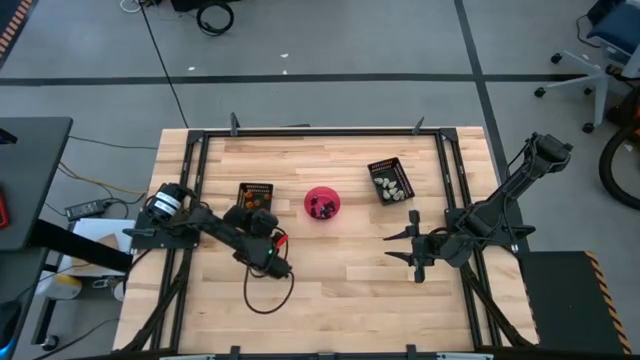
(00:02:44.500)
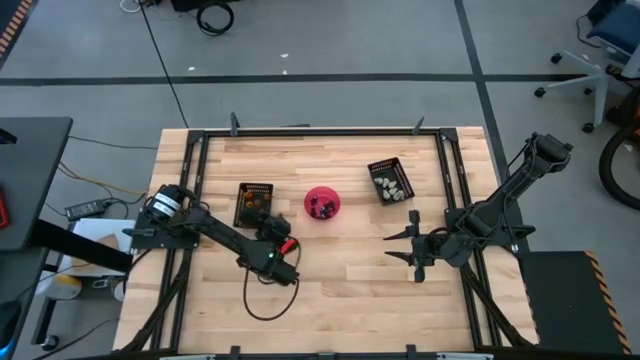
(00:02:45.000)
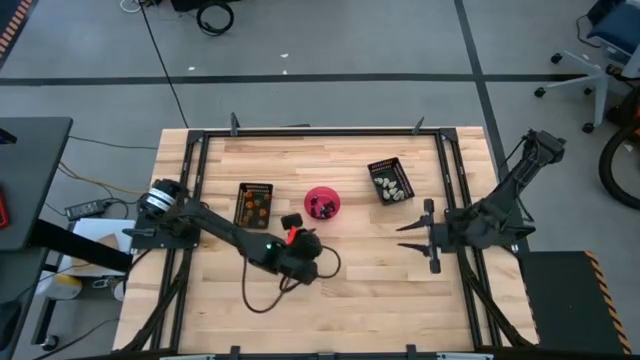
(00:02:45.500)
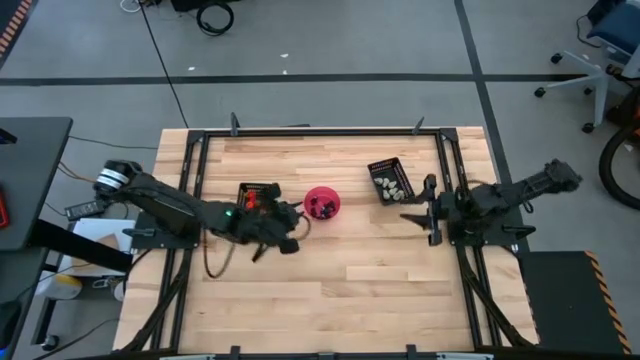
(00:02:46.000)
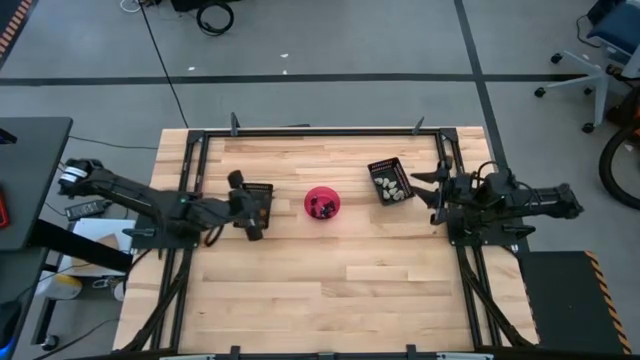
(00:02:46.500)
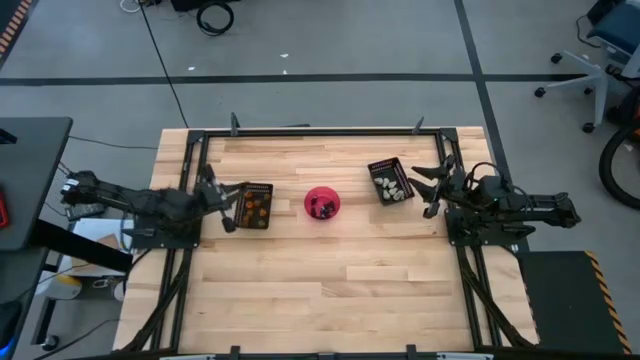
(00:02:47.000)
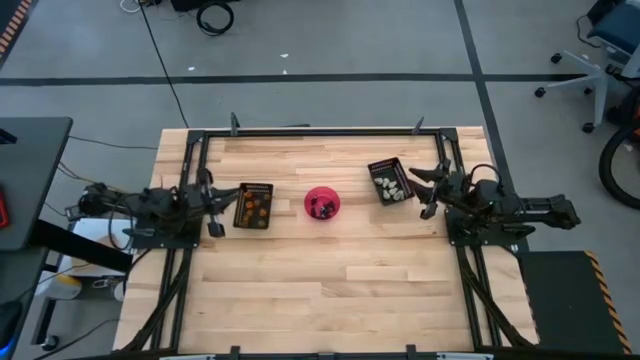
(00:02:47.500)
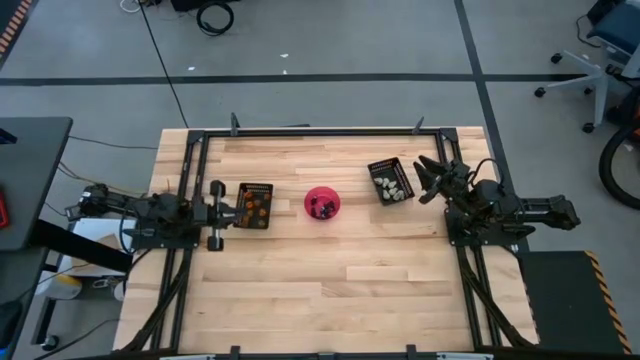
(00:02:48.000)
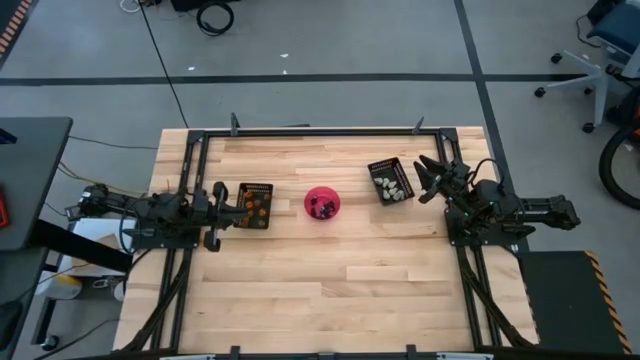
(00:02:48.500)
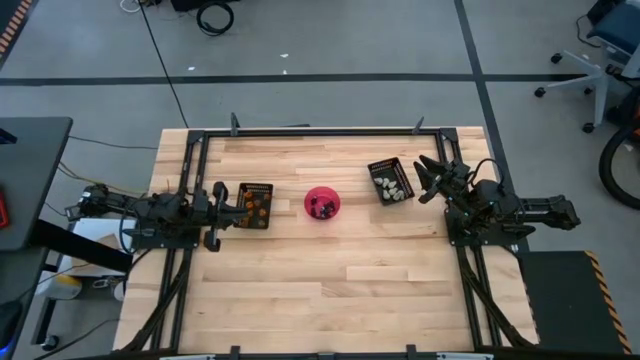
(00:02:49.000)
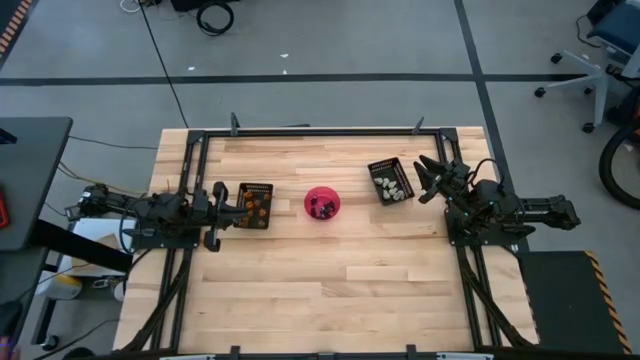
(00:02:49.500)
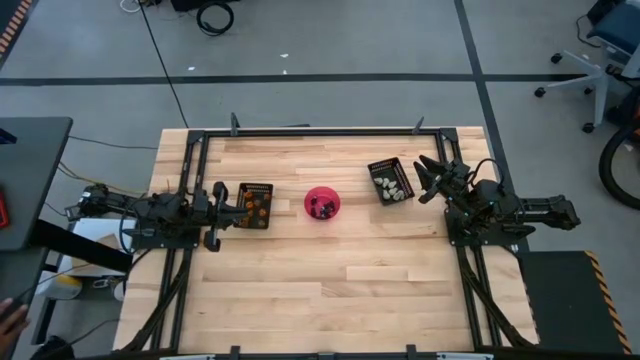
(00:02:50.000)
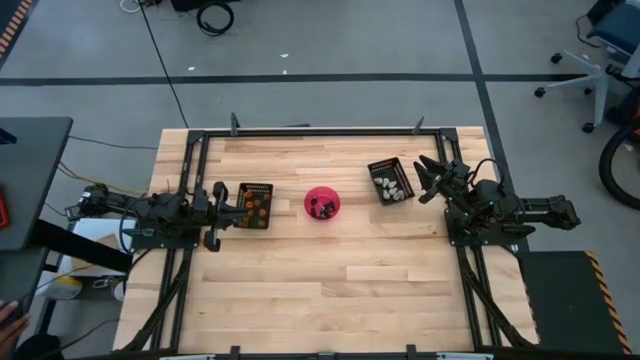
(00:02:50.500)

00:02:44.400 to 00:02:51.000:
Task: Sort Halloween decoration
Return to Home Position

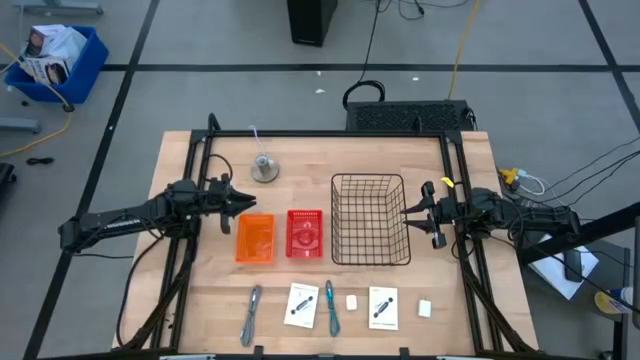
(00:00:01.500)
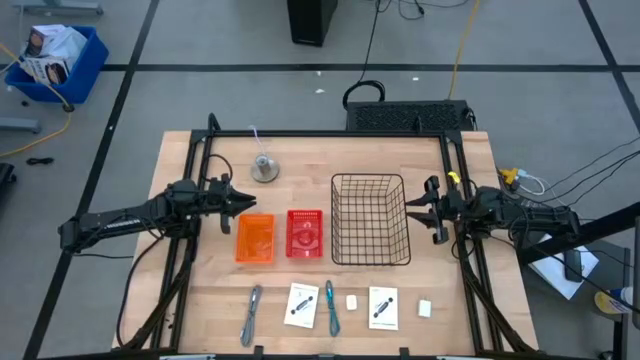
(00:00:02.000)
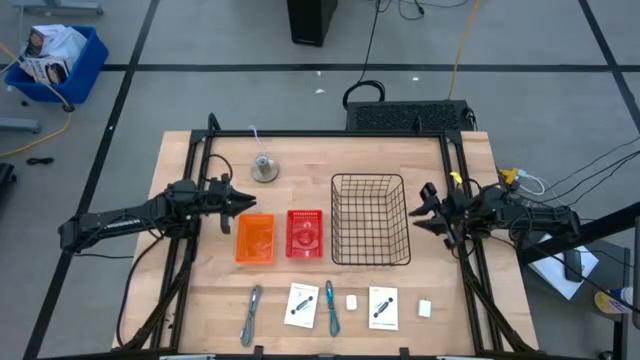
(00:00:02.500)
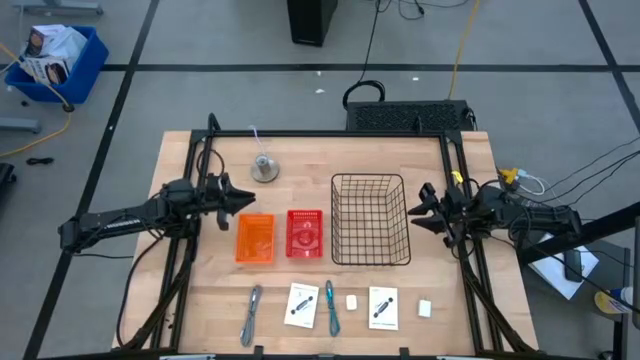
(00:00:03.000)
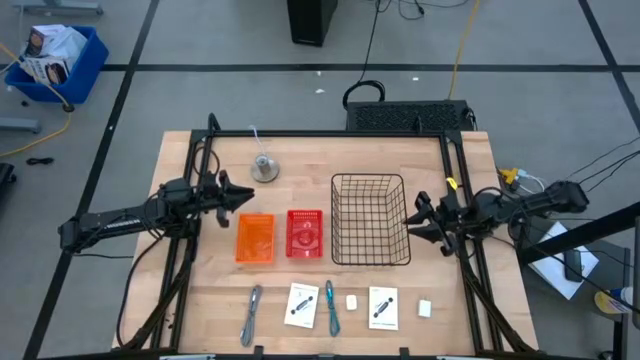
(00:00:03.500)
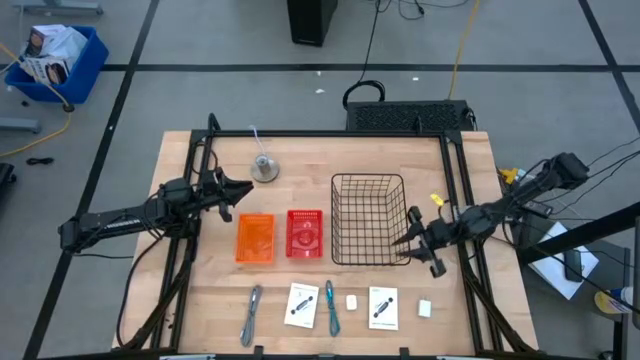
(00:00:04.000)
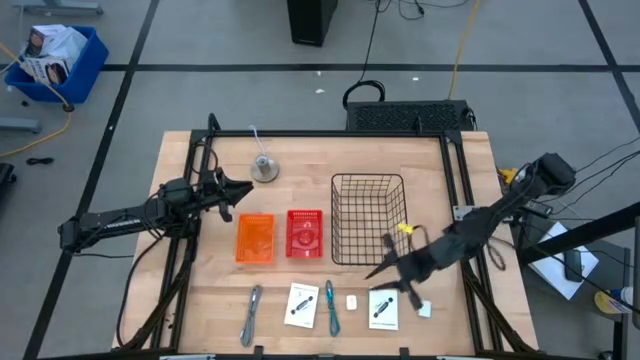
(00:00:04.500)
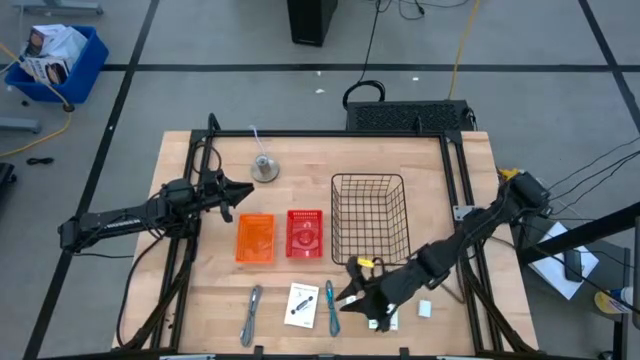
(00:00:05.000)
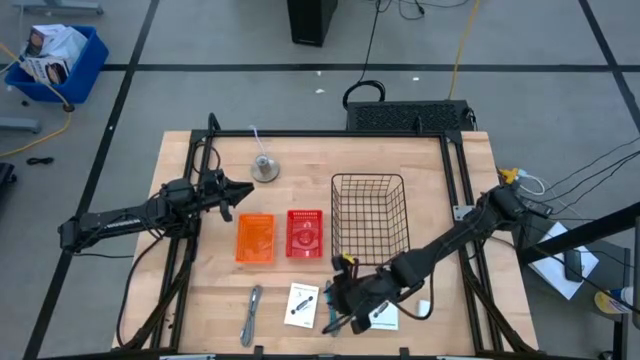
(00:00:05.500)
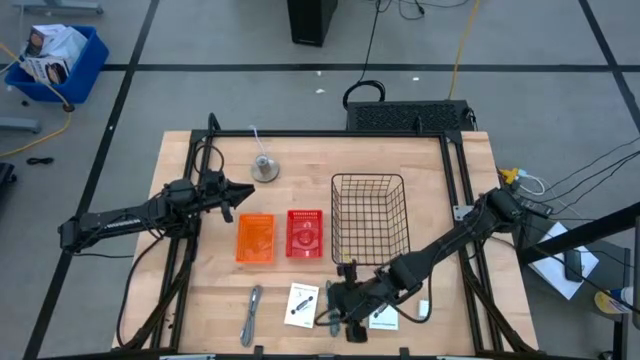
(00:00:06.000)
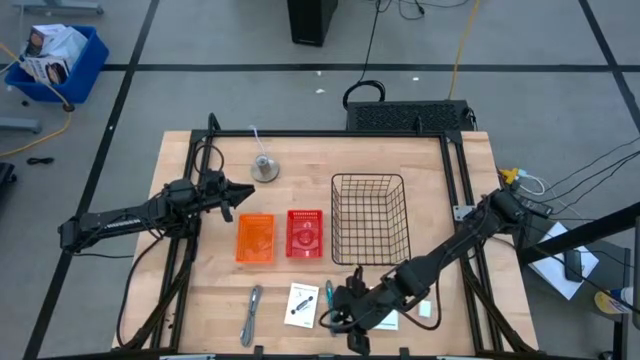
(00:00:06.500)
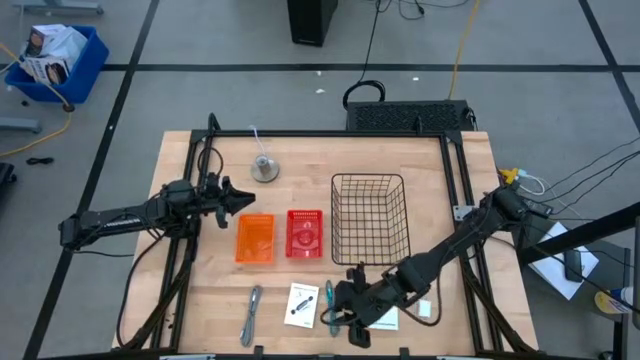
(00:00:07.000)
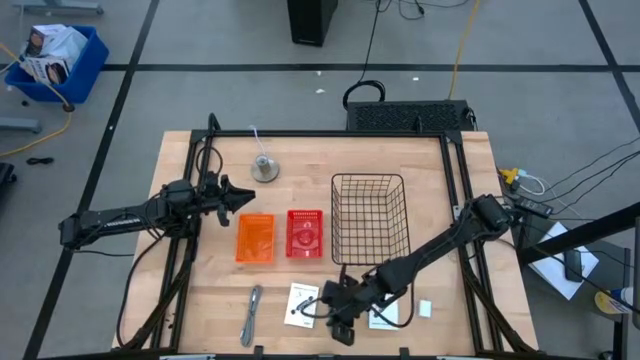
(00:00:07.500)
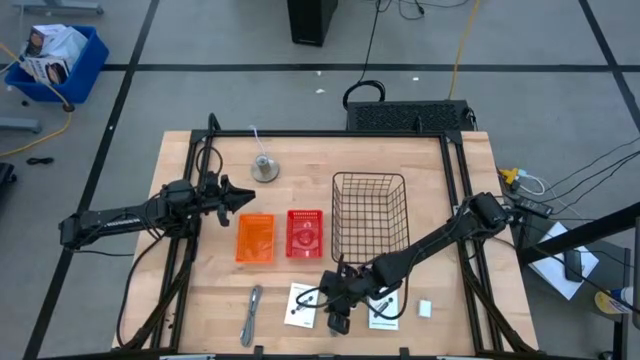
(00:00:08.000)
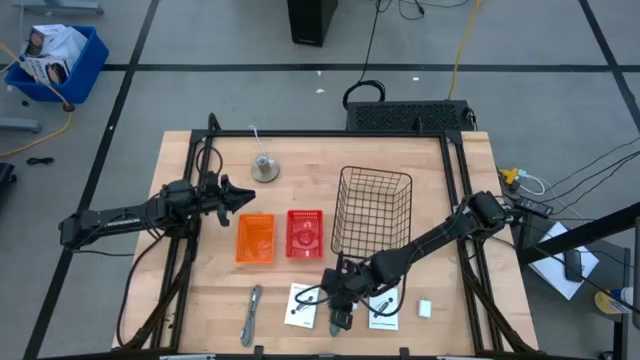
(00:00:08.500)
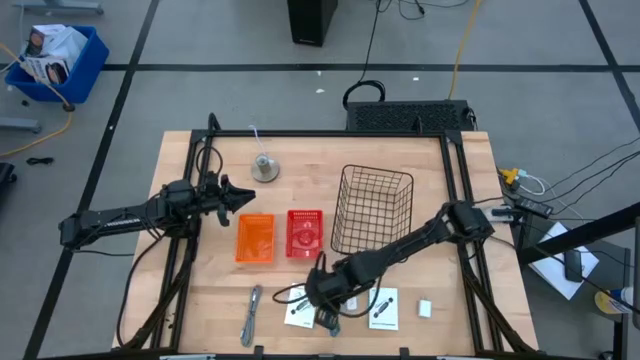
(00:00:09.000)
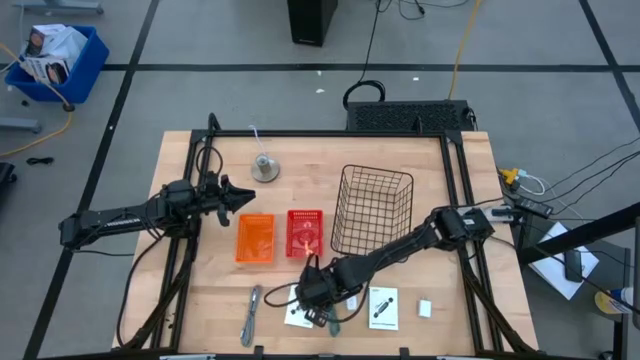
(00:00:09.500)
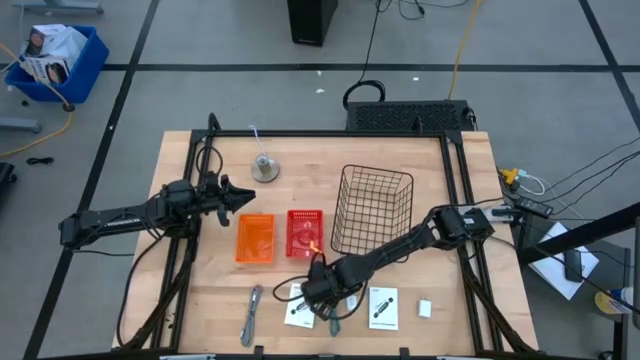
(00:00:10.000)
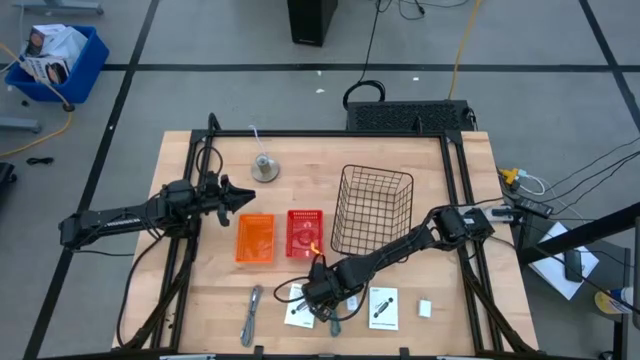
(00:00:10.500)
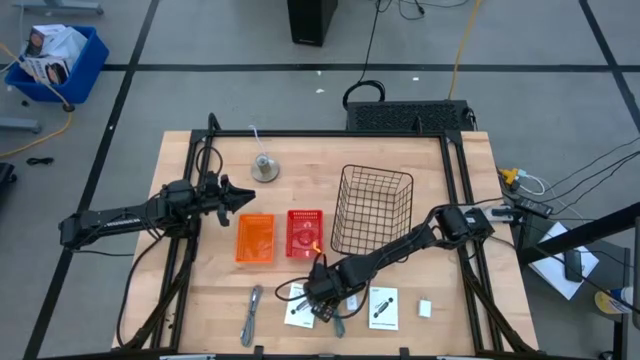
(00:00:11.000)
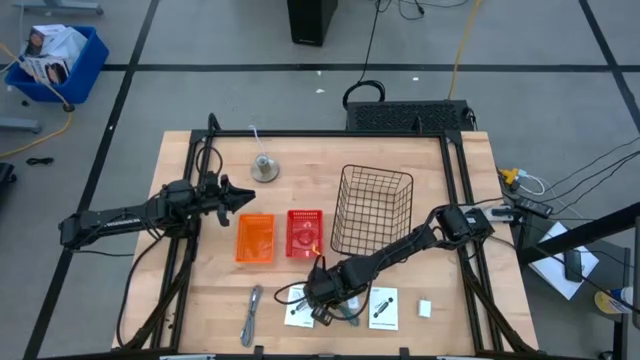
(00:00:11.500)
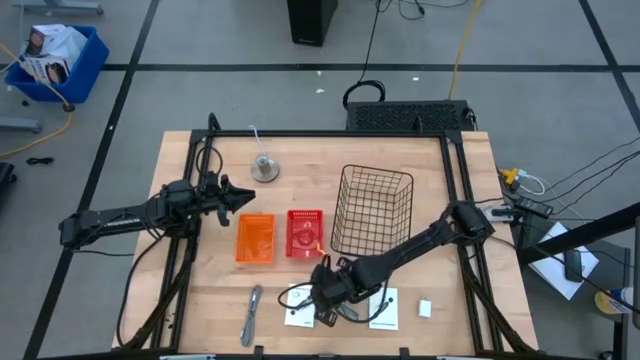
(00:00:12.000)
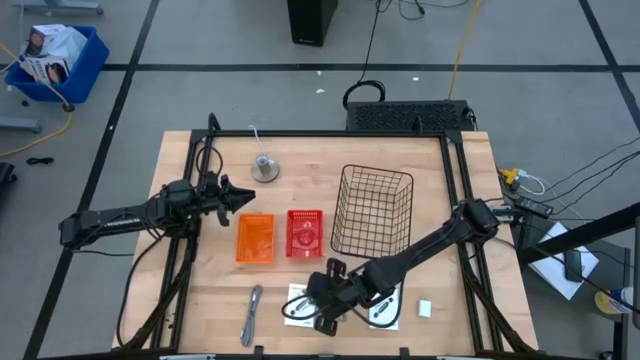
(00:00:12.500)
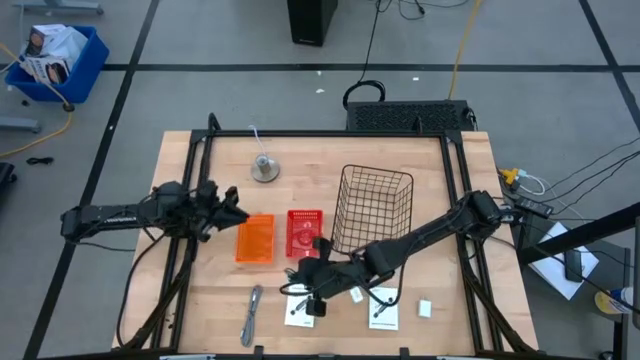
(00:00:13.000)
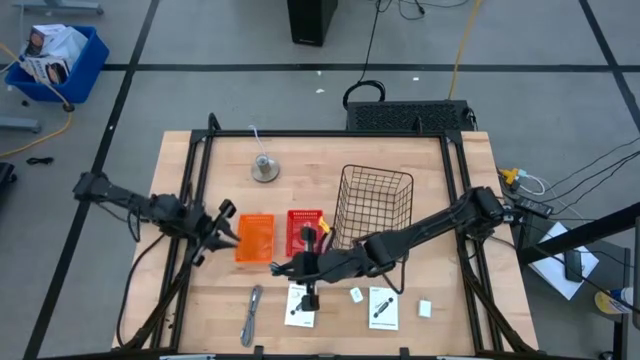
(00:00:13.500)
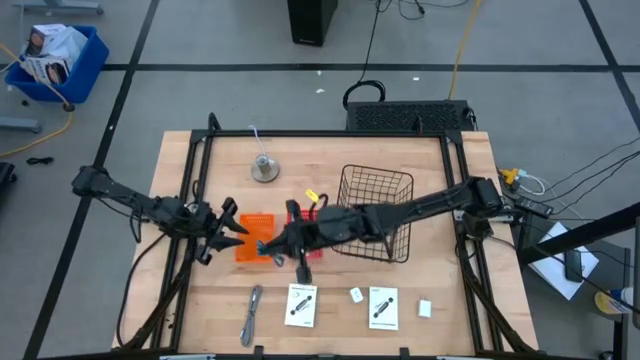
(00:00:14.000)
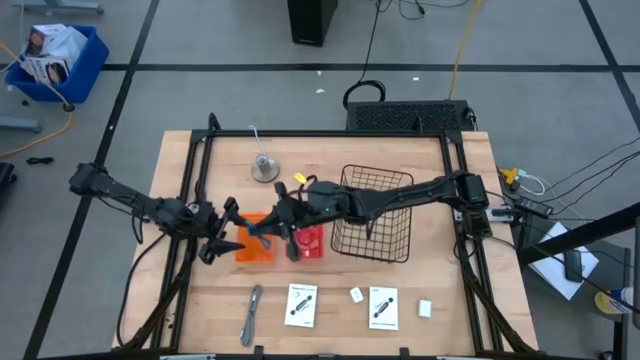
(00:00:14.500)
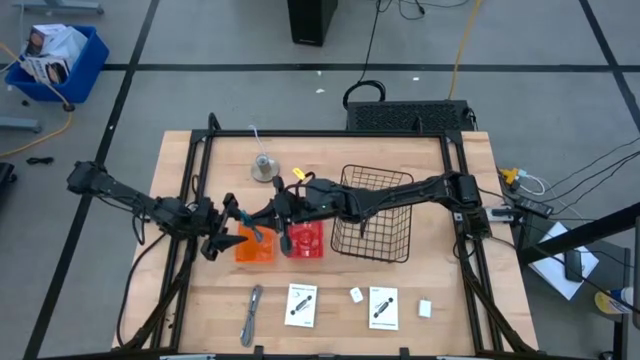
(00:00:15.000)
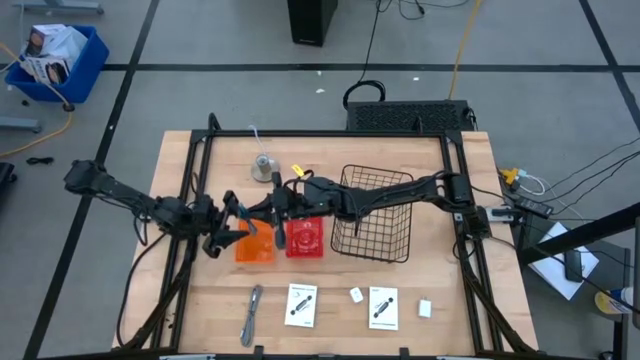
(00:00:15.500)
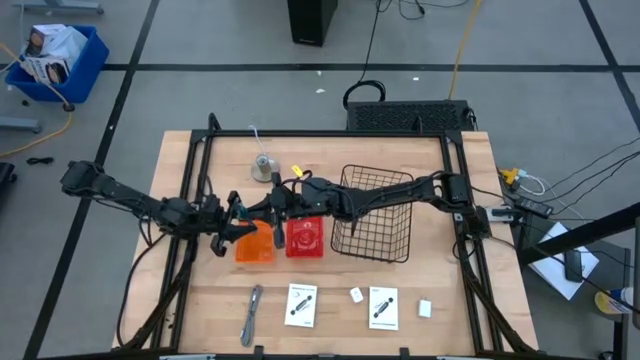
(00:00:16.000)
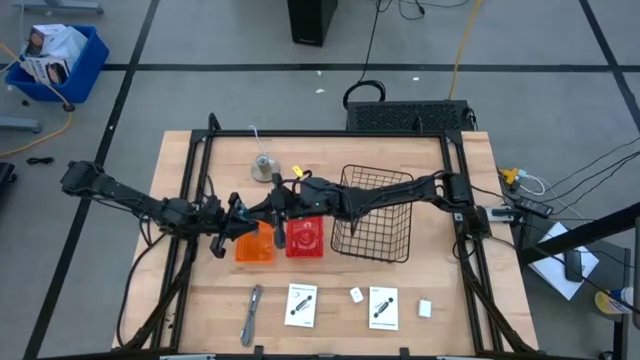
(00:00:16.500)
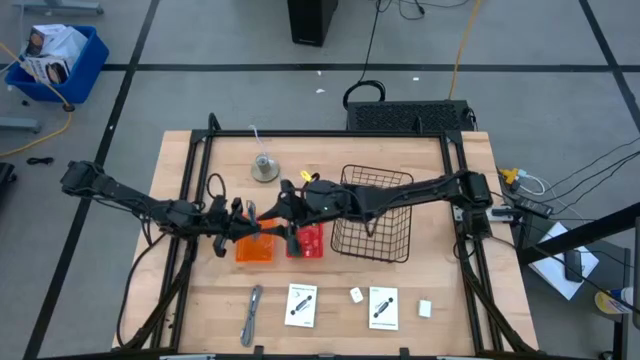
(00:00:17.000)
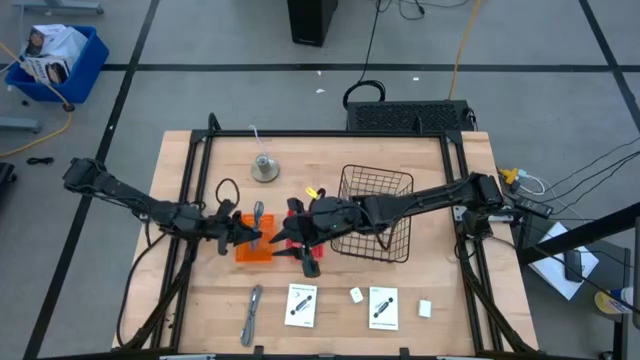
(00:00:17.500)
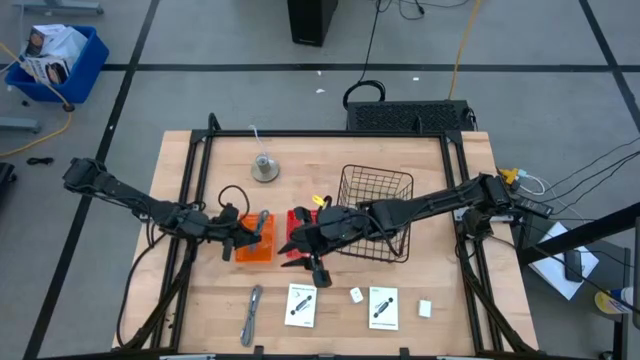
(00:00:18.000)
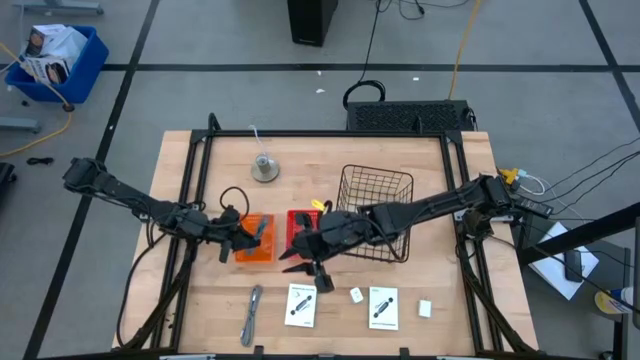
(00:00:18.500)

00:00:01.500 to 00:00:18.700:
Task: Pick and place items into bin
Put the blue charger cable into the orange bin
